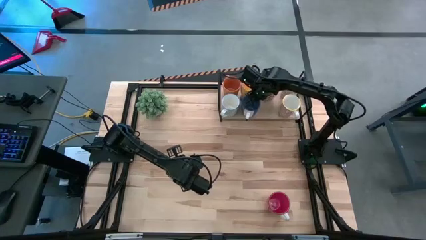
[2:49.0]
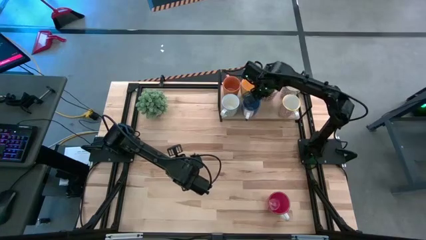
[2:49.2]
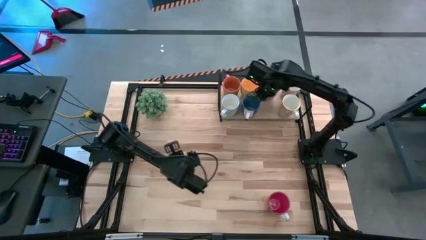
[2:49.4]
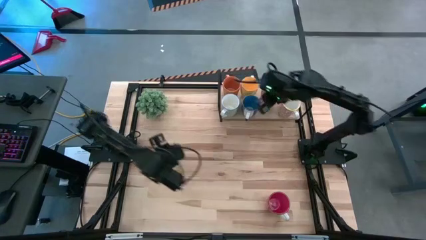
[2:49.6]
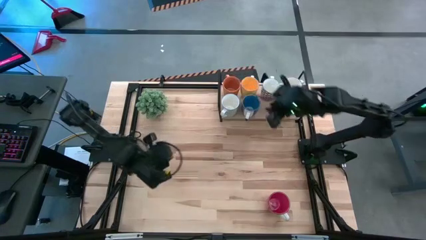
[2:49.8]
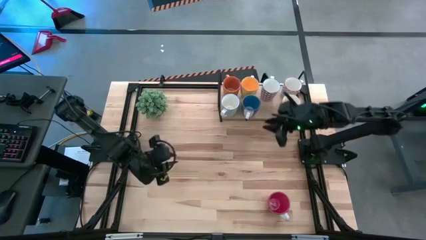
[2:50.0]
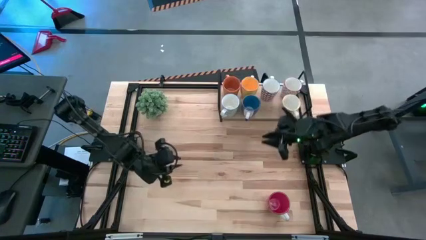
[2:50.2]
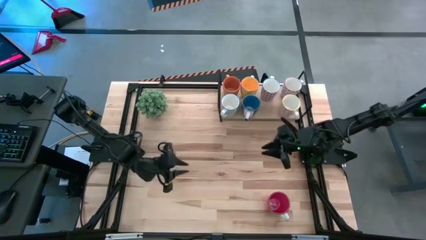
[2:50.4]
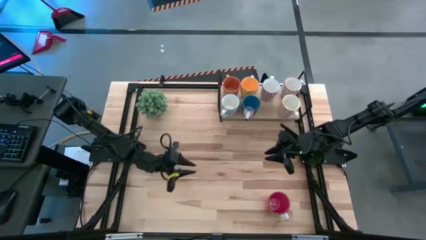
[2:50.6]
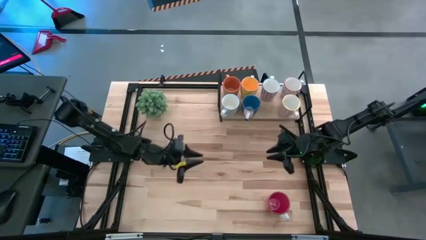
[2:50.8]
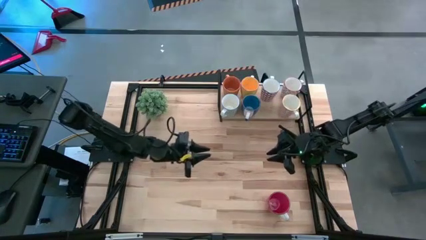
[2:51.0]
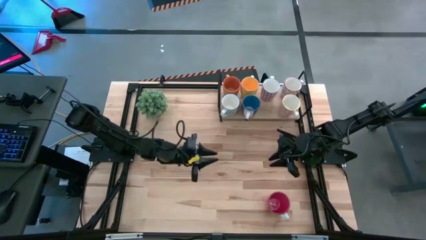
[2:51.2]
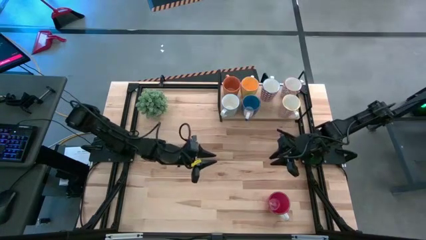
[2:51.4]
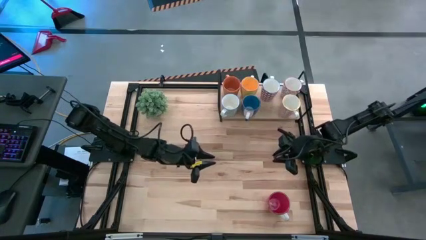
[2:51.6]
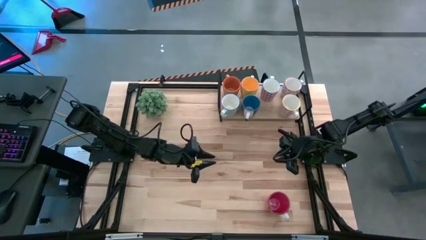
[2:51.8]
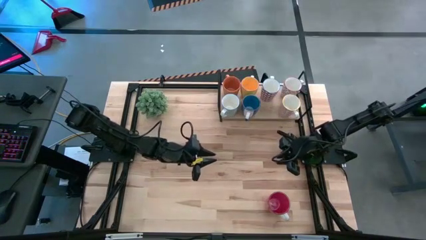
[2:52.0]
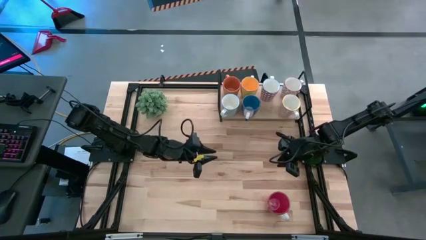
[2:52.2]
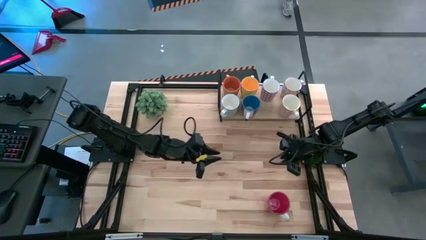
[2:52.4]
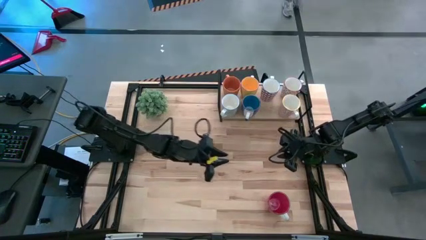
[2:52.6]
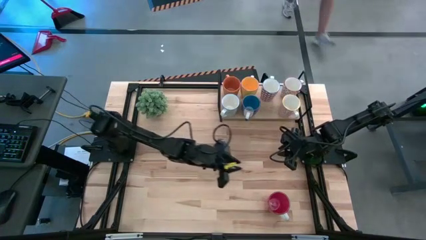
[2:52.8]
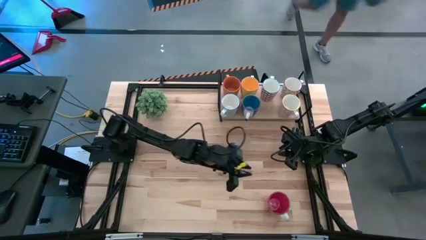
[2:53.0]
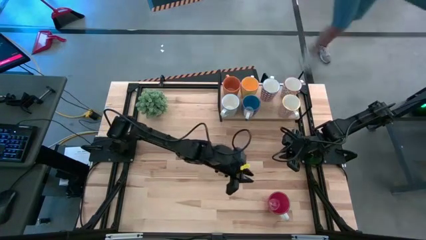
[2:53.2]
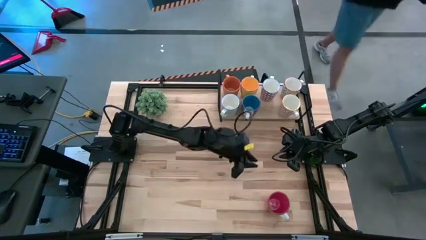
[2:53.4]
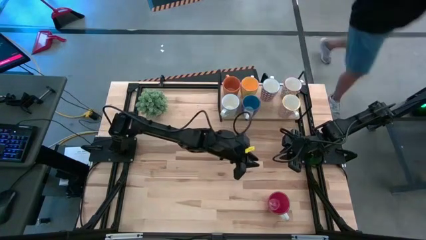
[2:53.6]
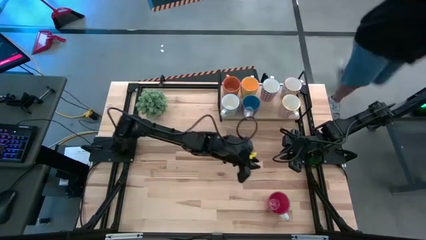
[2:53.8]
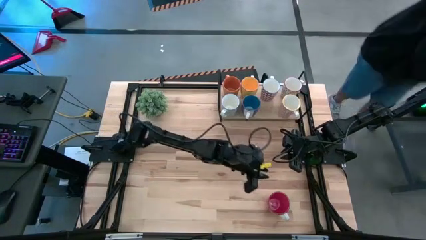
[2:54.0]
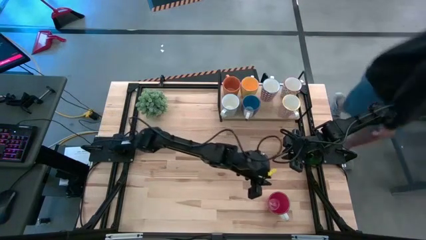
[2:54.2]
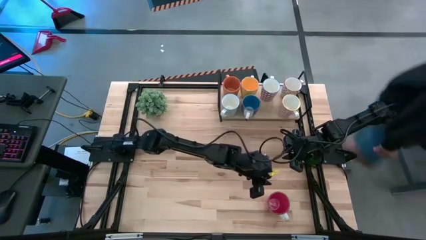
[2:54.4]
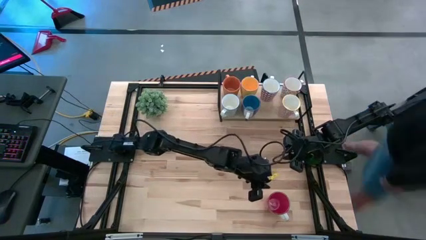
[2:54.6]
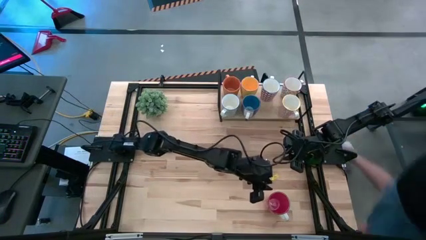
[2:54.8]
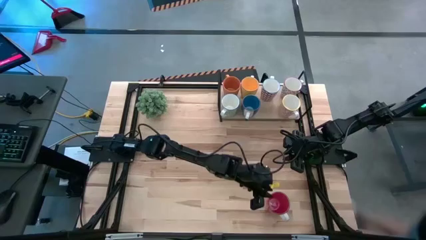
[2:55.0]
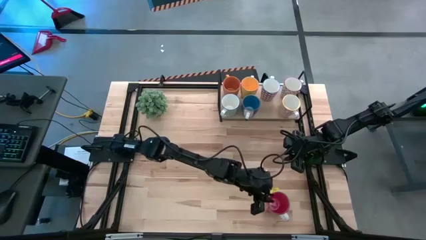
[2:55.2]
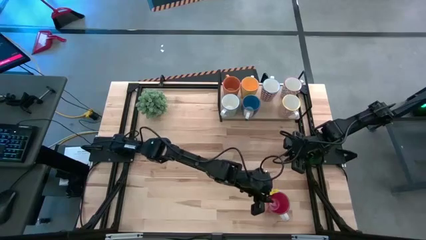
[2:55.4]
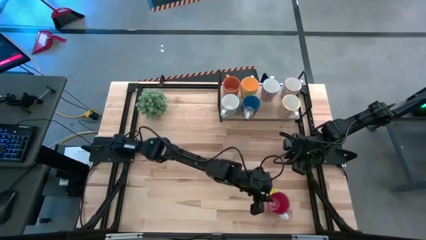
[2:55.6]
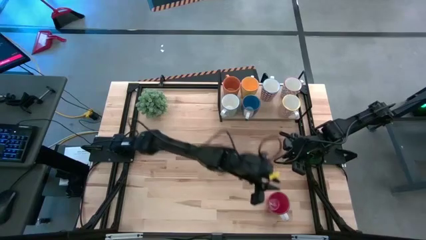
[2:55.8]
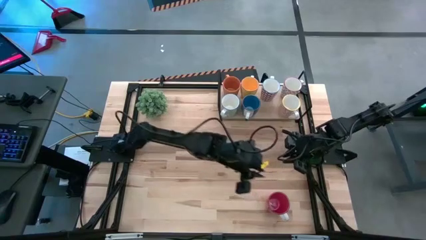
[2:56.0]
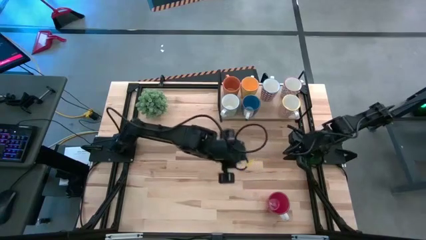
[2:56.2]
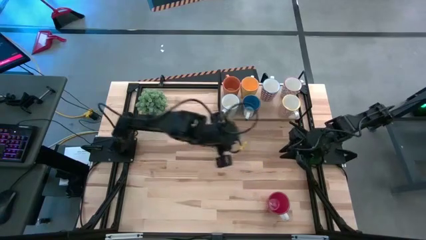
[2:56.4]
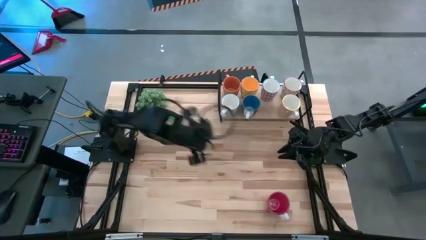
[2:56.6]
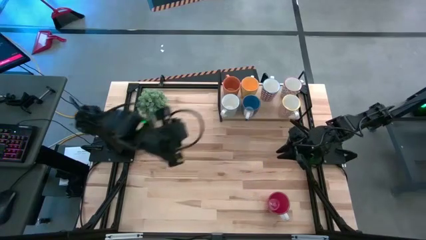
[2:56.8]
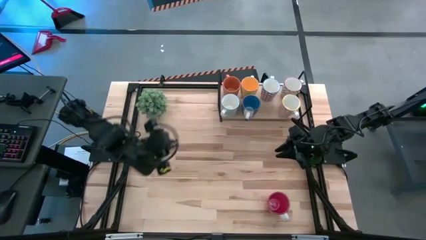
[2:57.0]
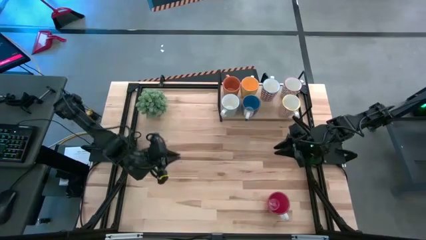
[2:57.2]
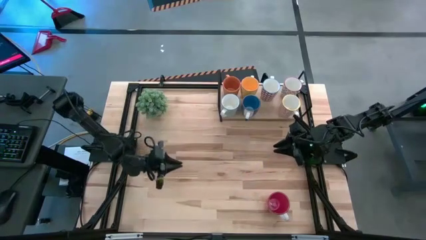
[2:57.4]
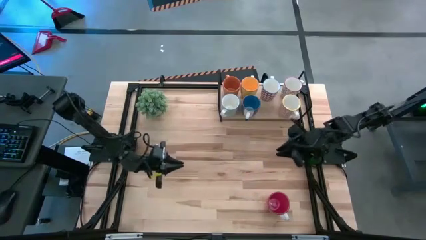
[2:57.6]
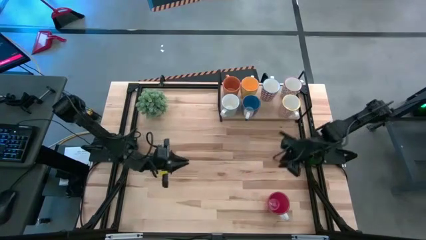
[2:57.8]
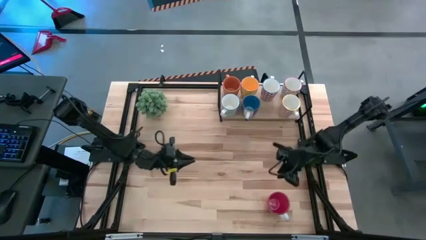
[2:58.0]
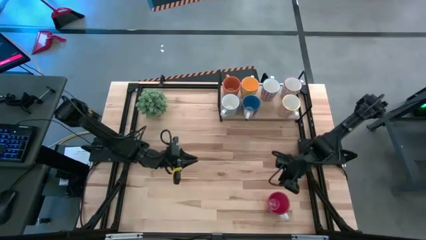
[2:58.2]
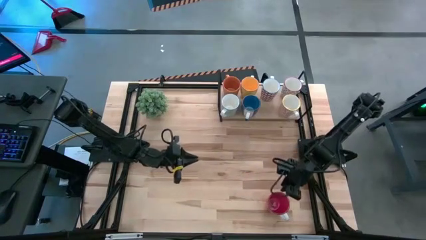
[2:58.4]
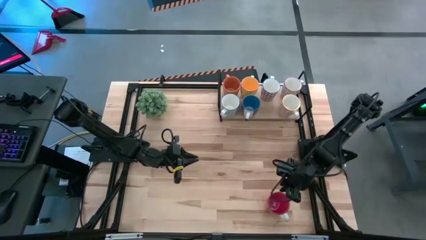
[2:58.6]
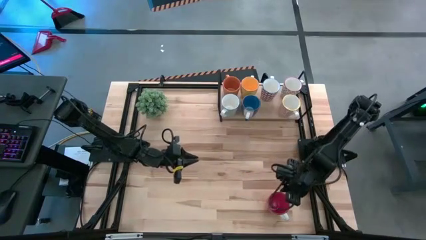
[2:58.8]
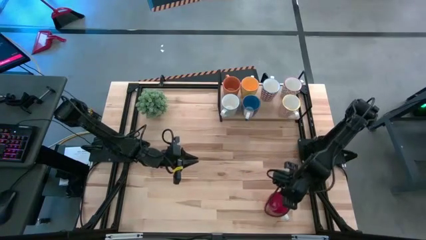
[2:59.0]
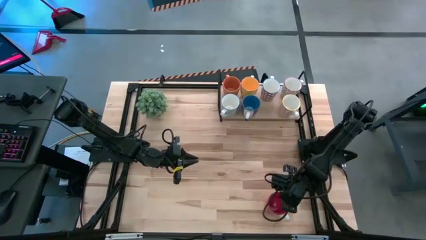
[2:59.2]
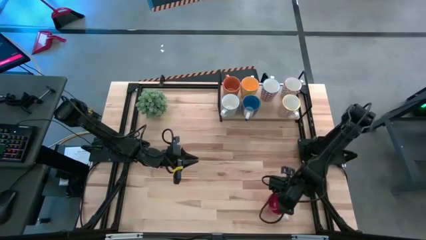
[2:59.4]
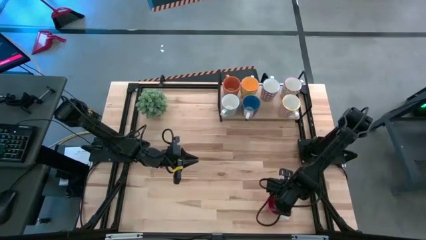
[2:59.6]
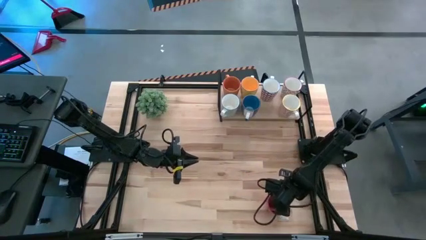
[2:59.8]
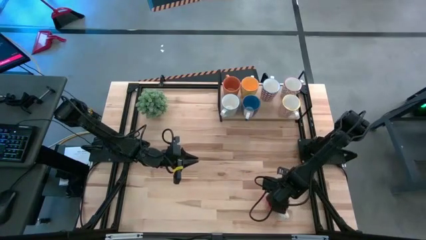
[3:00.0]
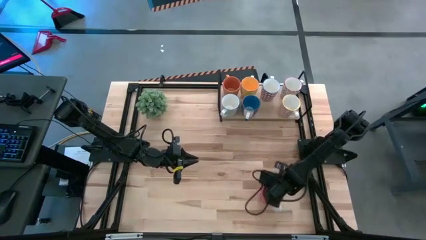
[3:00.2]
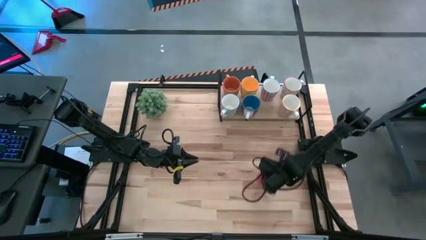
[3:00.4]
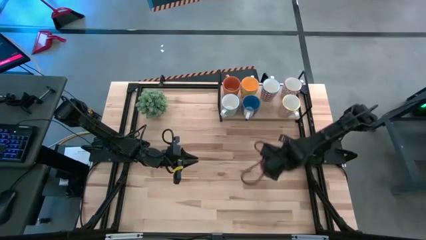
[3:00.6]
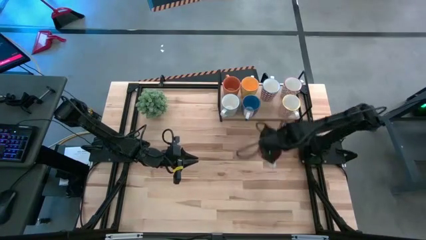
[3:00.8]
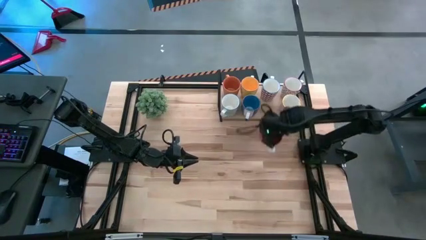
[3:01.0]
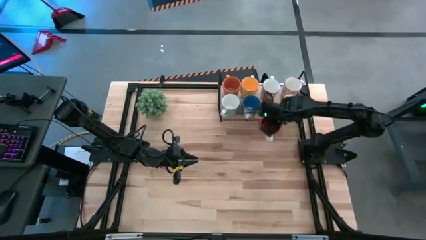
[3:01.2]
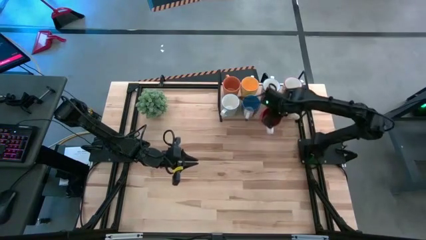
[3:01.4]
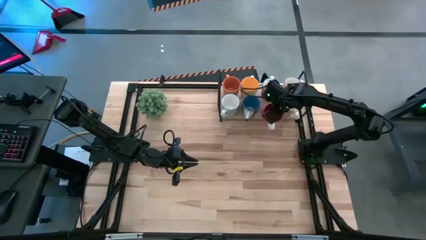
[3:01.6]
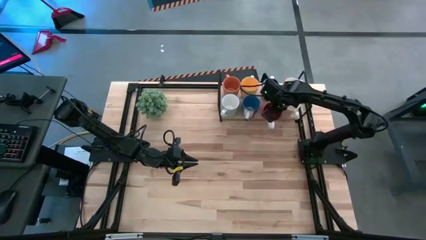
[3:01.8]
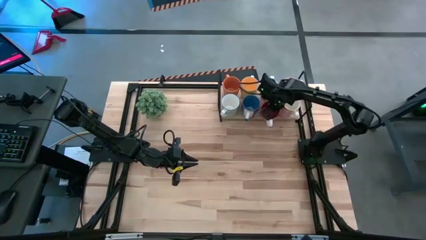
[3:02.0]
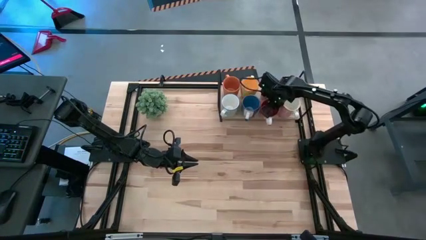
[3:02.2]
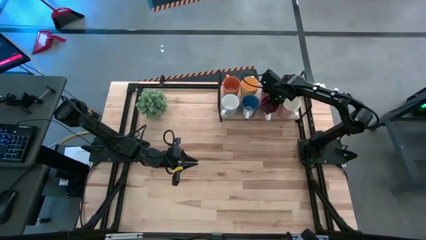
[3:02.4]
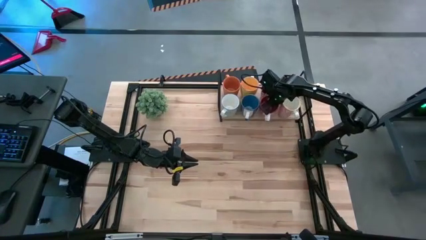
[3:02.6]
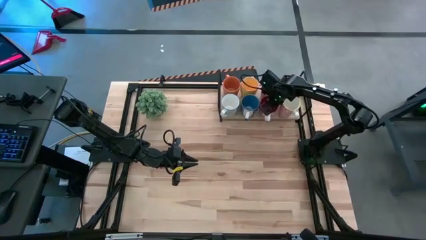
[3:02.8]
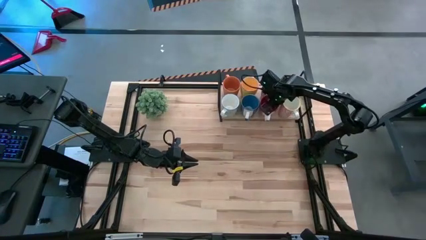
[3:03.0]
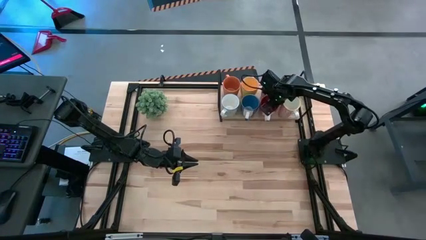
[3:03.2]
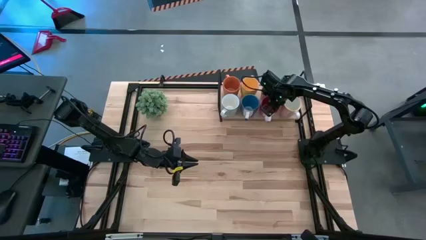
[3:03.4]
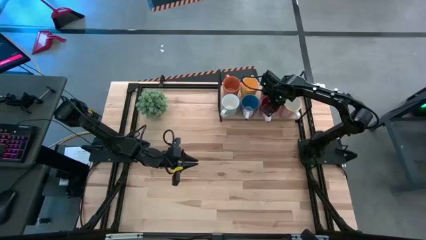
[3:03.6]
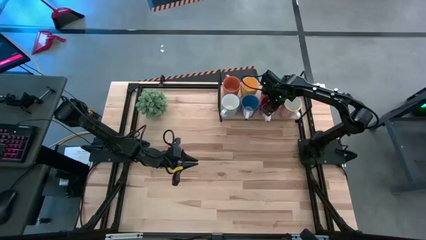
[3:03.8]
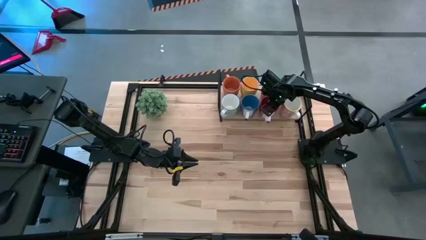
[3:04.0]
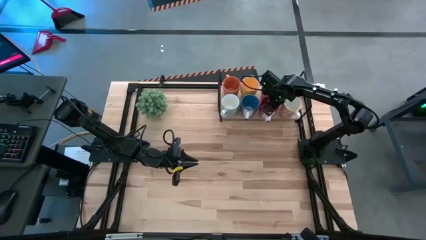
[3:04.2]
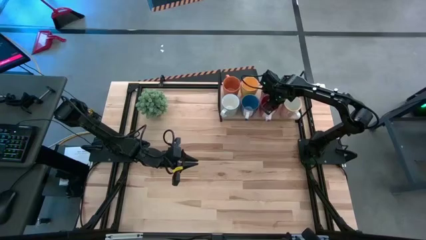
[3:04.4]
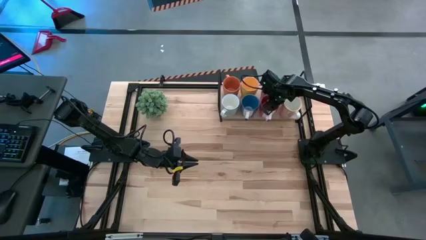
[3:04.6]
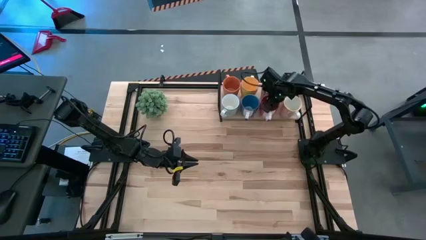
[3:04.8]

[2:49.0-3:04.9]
Task: Place coffee mugs
Put the red mug on the shelf
